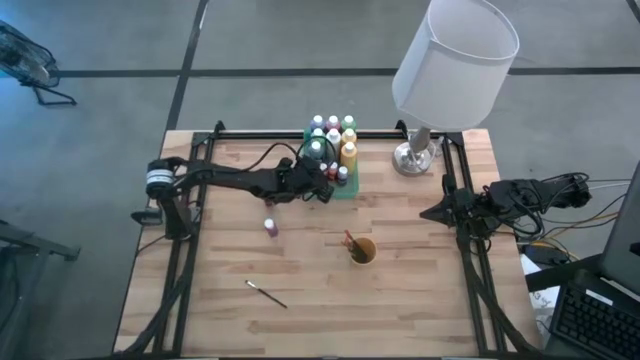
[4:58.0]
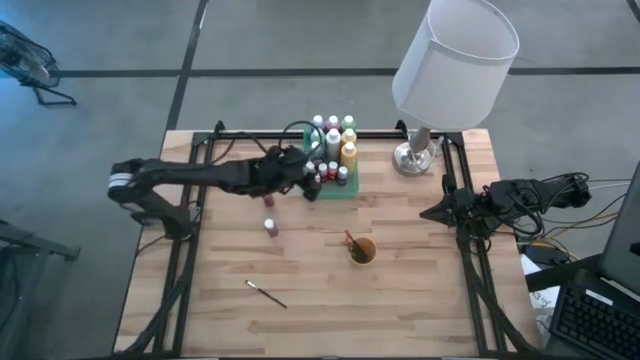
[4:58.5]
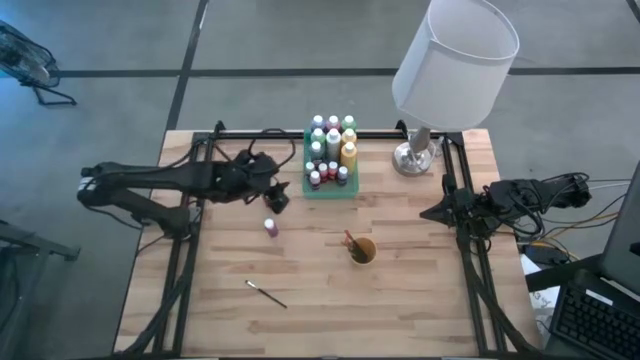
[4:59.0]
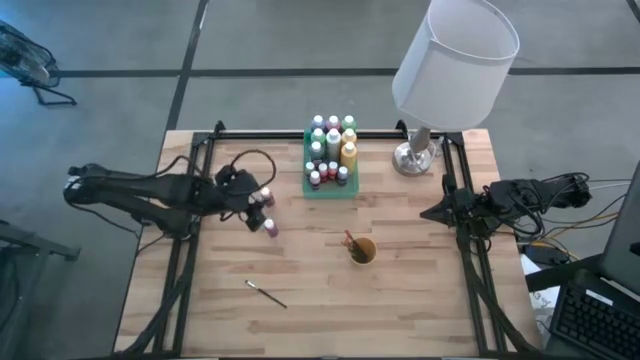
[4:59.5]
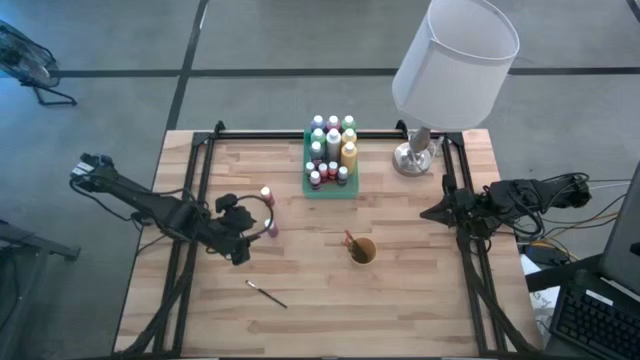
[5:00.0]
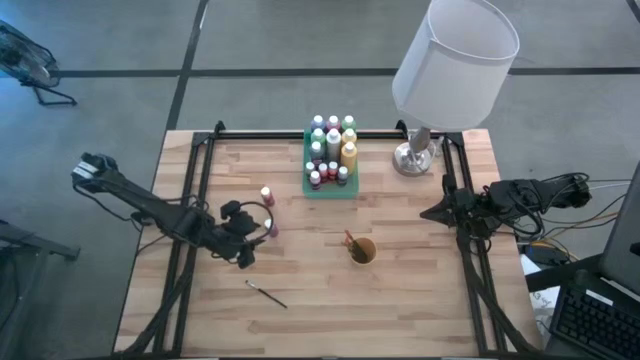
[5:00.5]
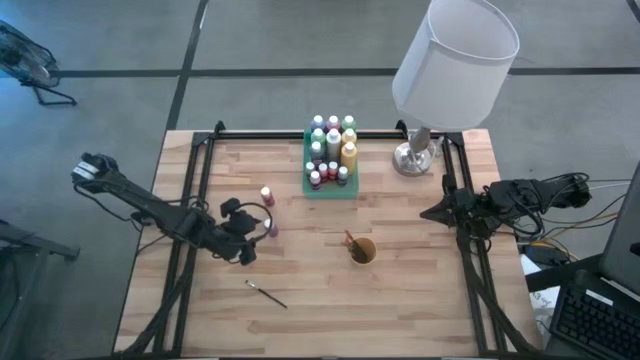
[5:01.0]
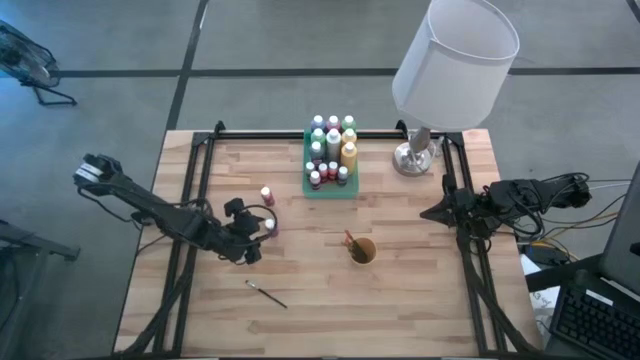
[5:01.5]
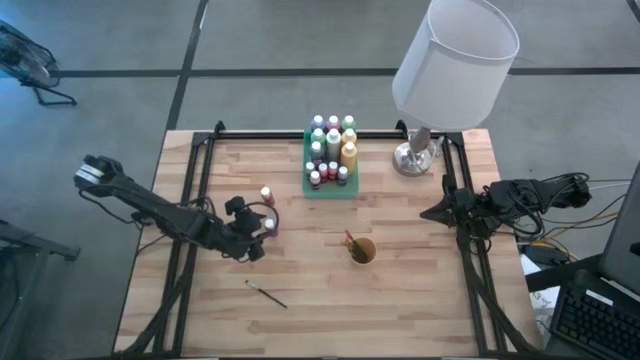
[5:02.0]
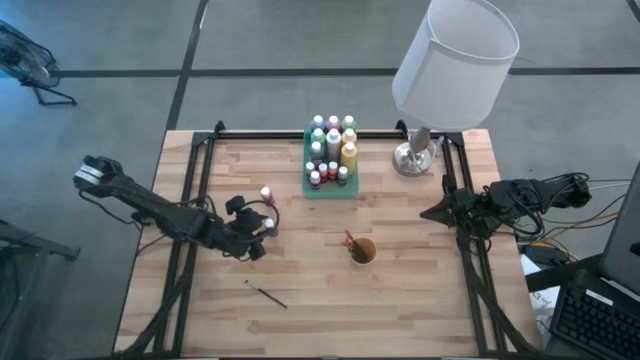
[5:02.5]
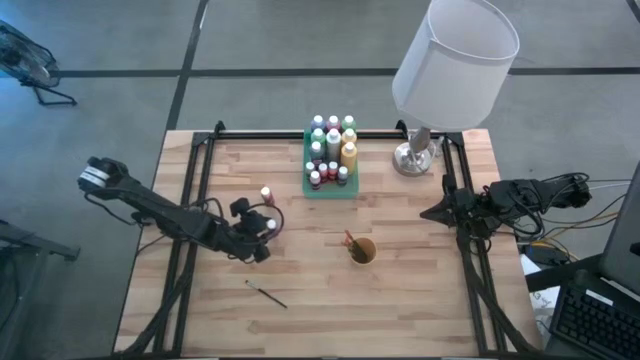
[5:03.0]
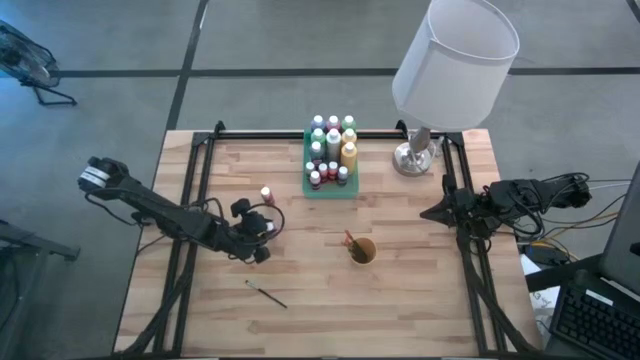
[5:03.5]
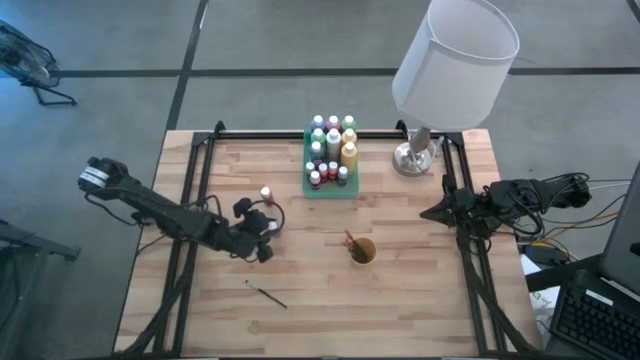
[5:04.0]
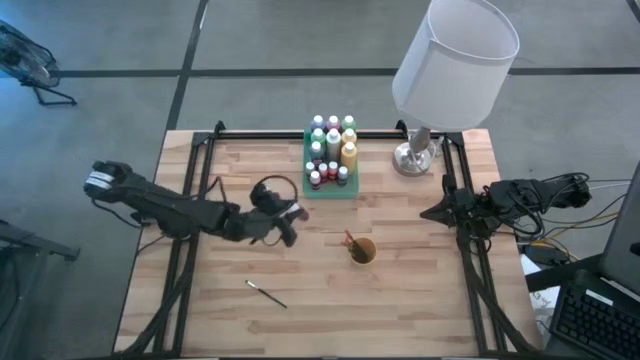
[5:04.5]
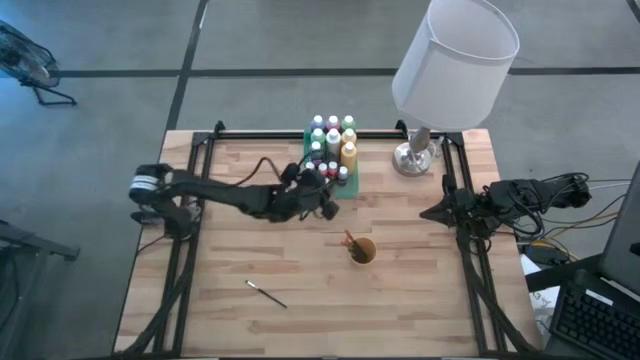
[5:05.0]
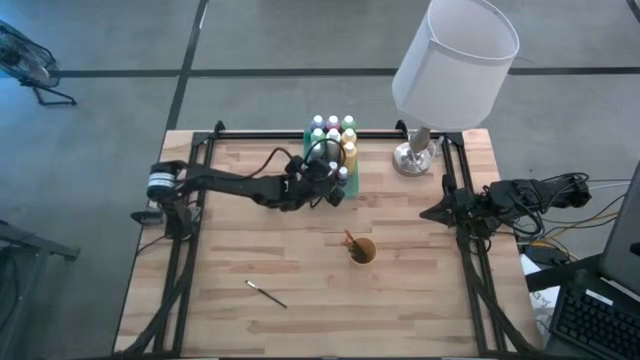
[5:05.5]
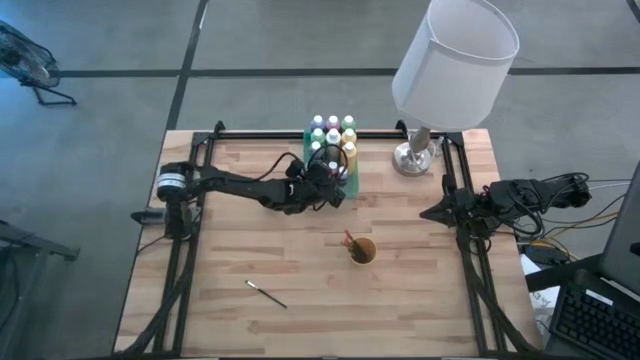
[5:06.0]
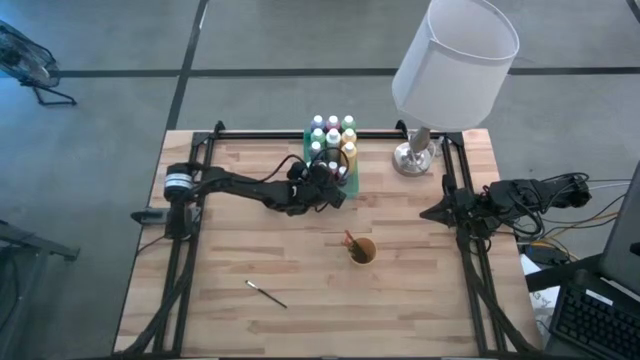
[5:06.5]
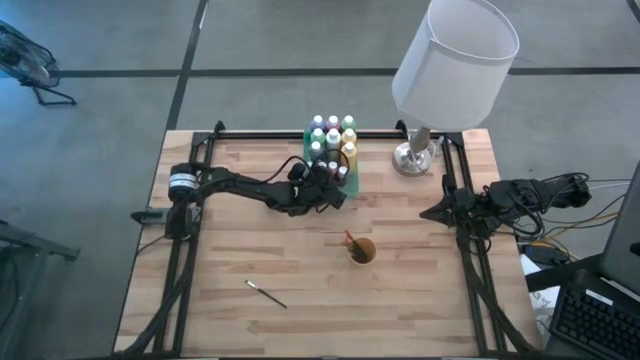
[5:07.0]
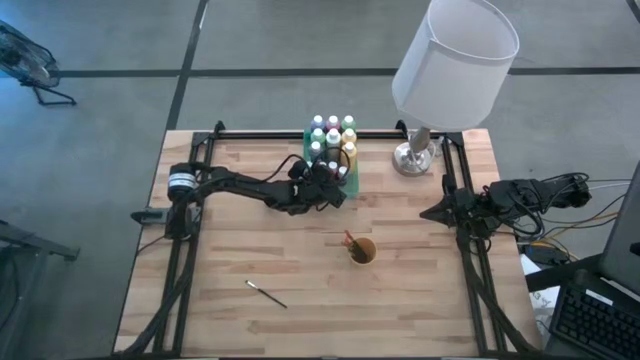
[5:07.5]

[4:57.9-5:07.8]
Task: Pick & Place Paint Supplies
Put the dark pink paint bottle into the green bin

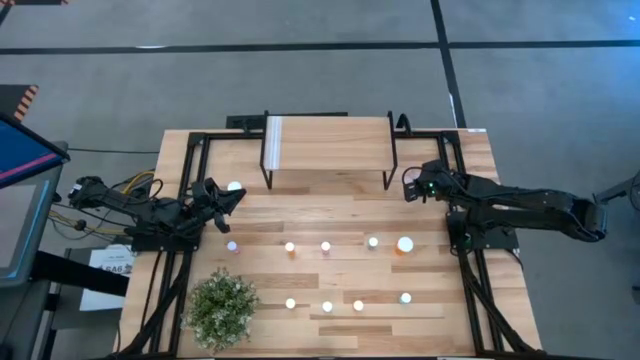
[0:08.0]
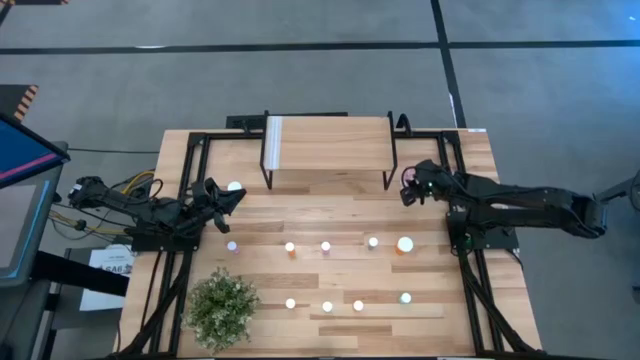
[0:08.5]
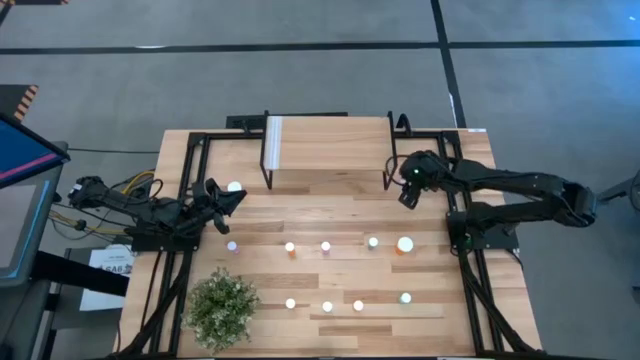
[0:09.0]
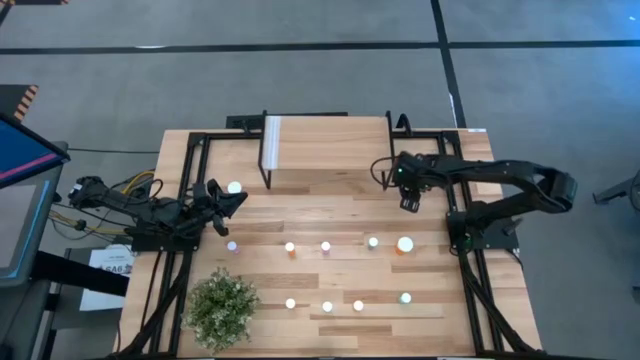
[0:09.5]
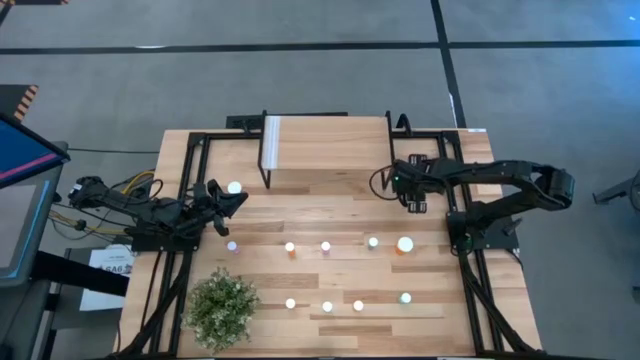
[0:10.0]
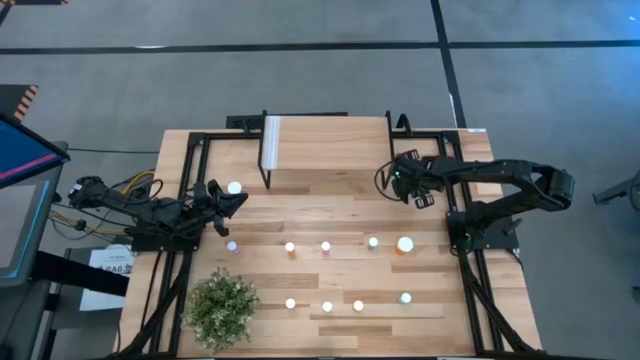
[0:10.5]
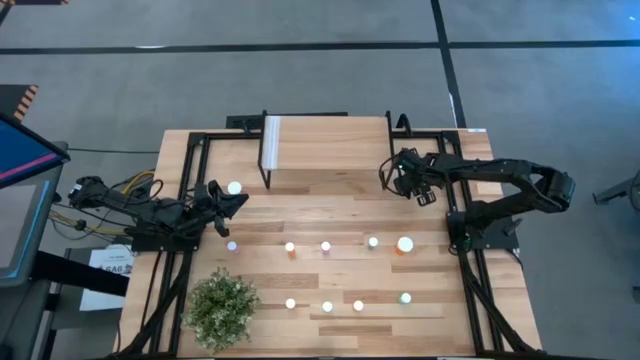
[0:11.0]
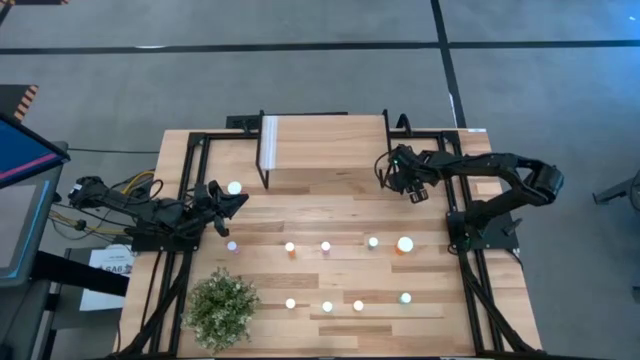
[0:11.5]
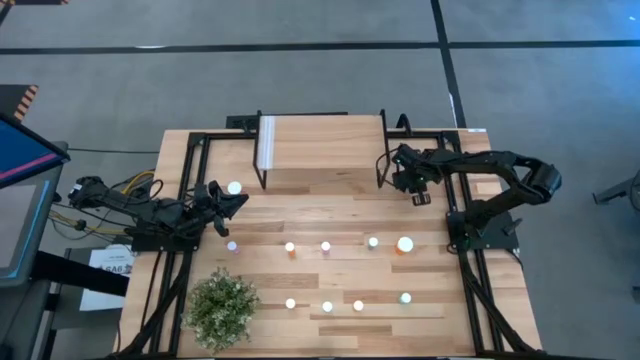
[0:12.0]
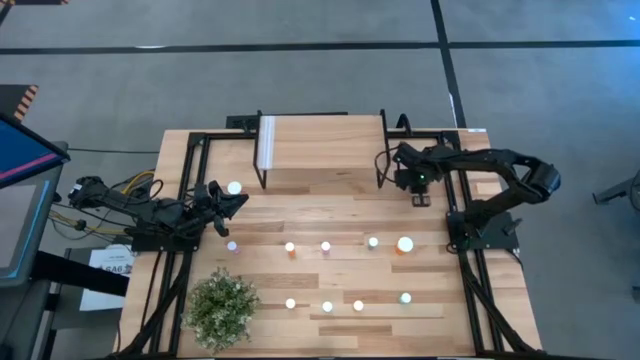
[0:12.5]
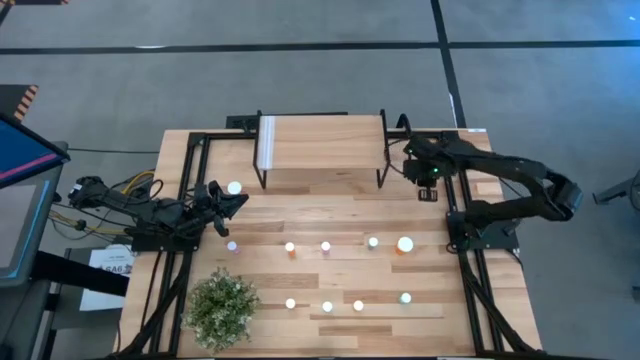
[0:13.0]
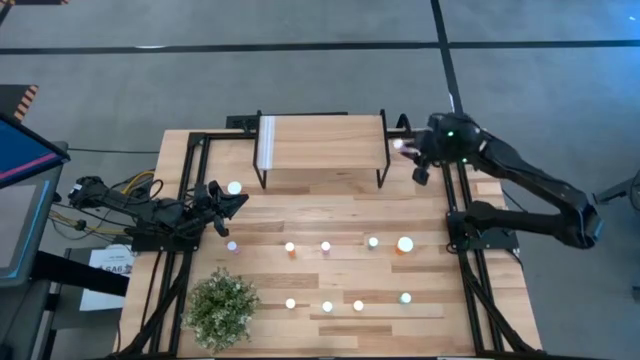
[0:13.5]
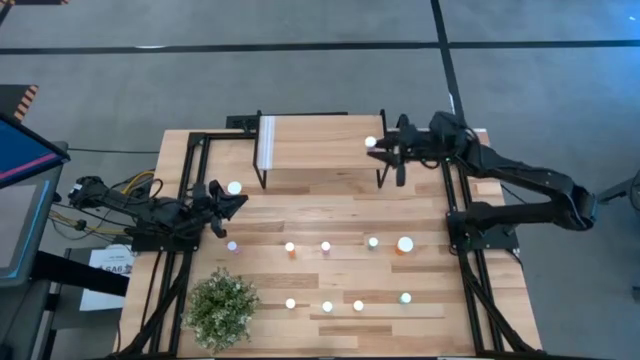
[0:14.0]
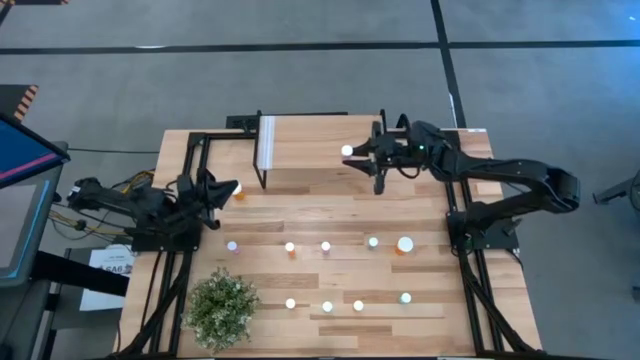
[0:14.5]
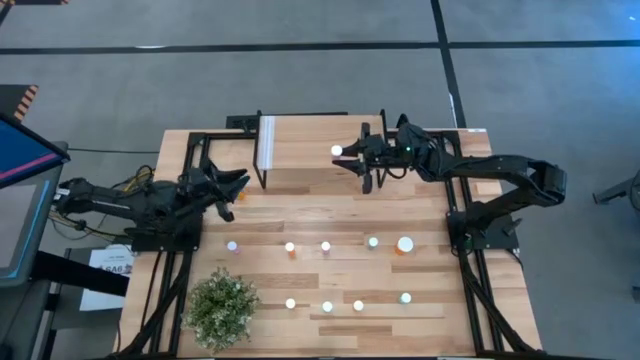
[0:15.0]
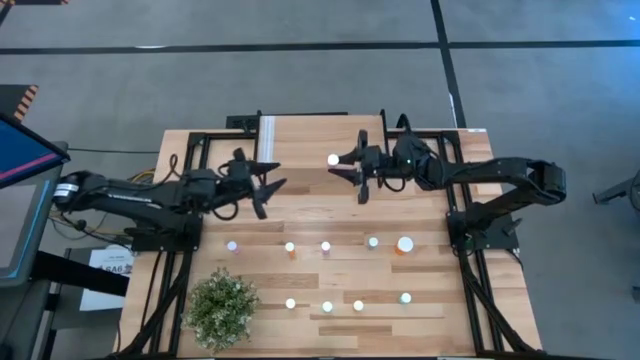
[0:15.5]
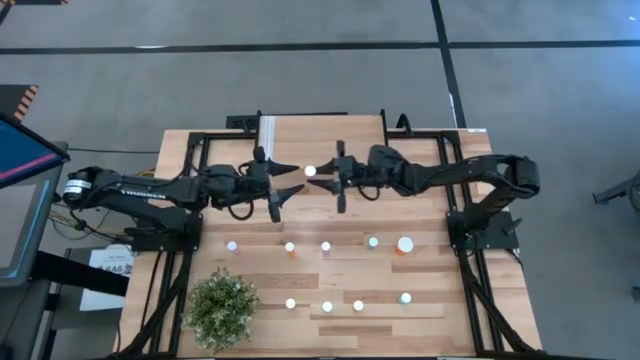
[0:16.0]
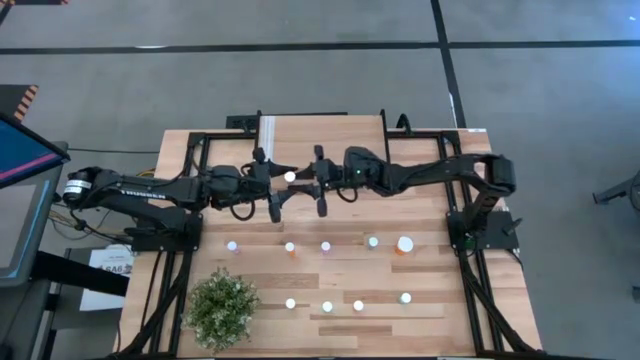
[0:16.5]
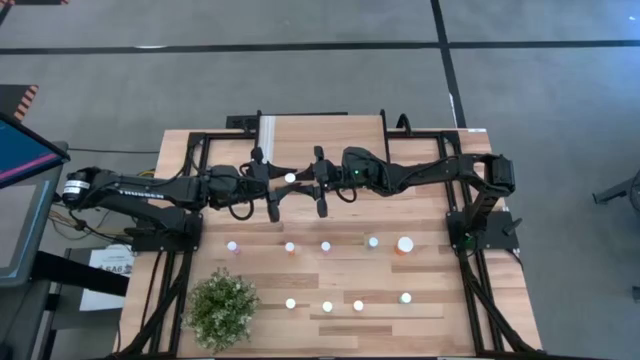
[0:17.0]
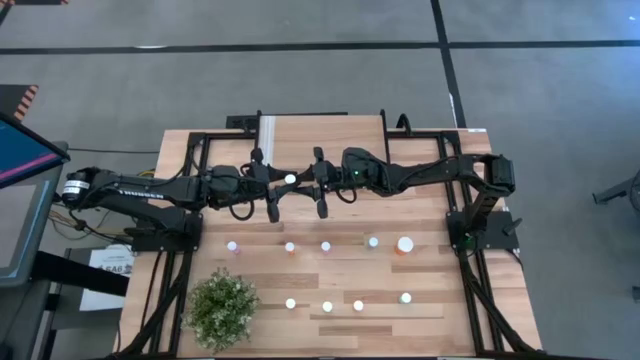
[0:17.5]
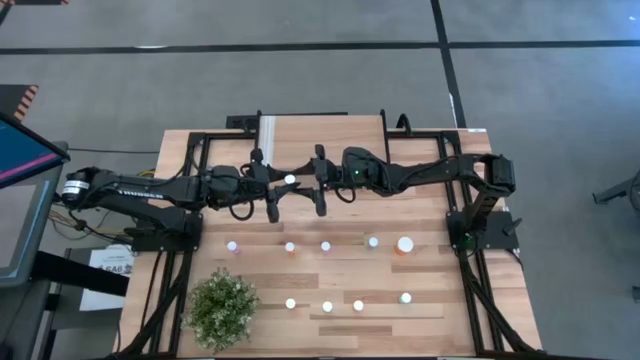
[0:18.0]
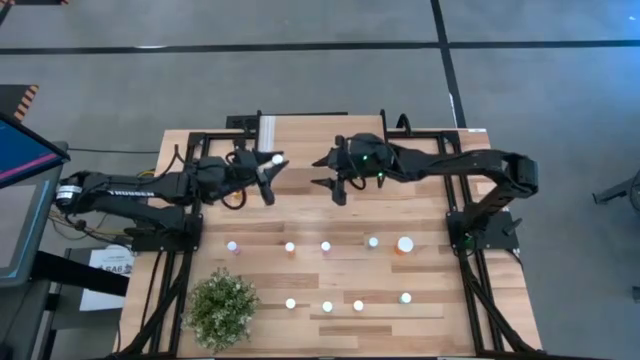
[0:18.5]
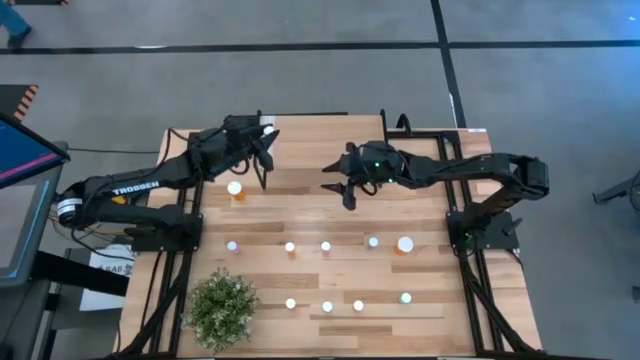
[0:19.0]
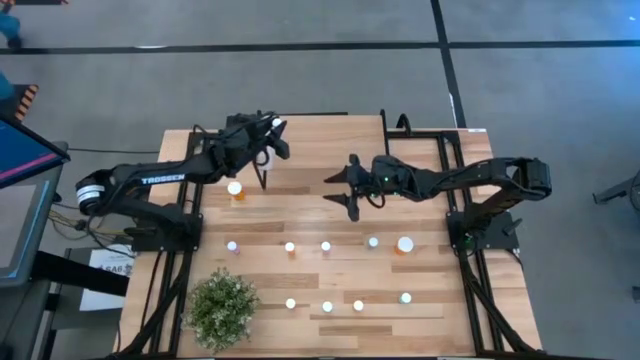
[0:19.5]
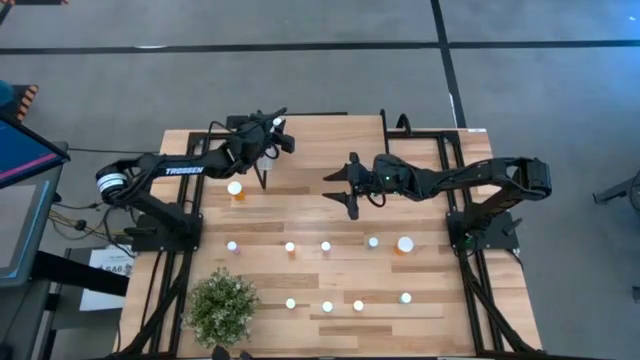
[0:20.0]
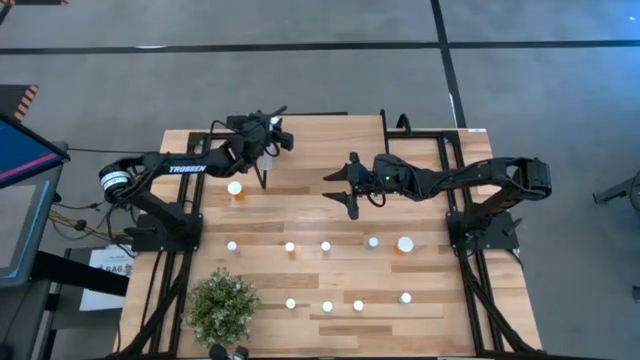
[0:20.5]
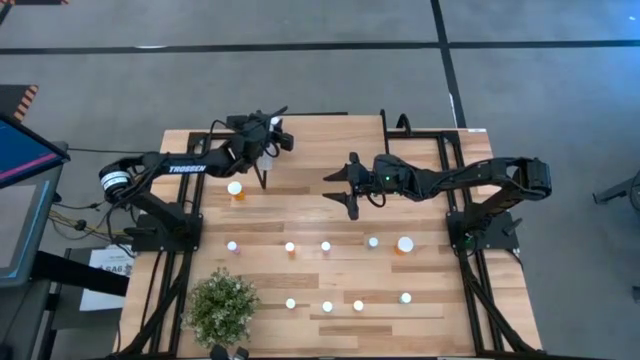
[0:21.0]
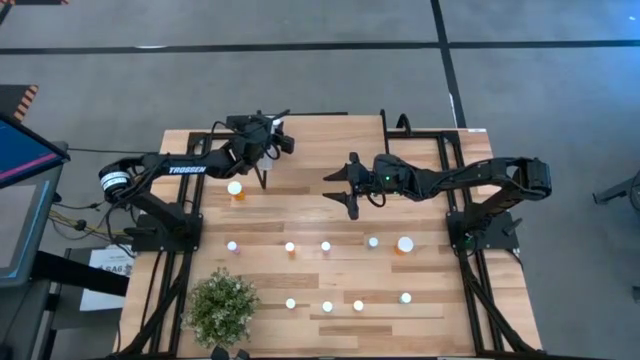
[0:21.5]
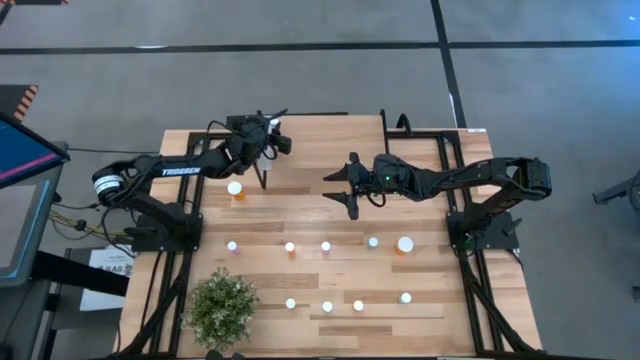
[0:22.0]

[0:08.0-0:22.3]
Task: Pick and place medicine bottles onto shelf by color
Put the small pink pill bottle on the shelf
